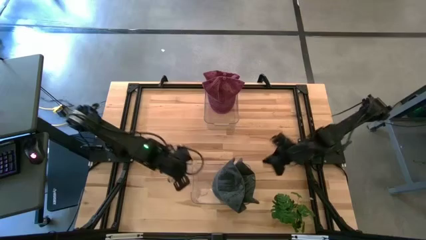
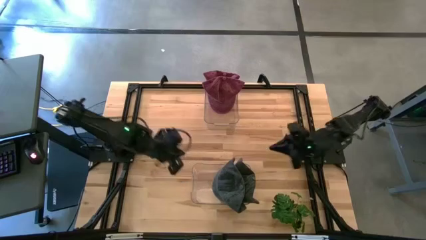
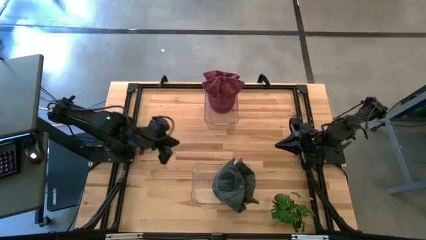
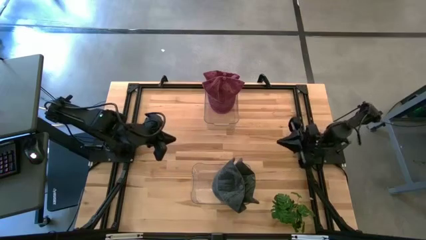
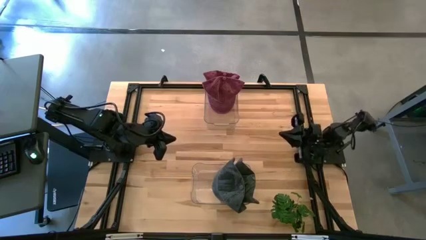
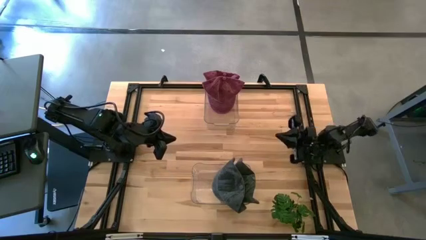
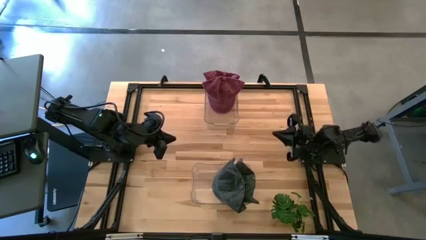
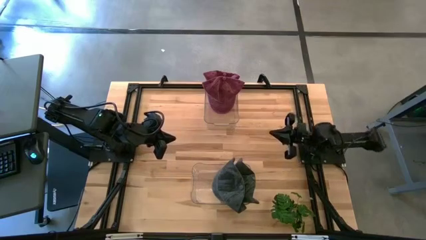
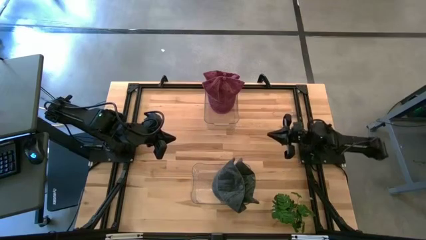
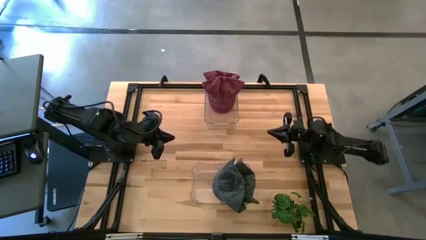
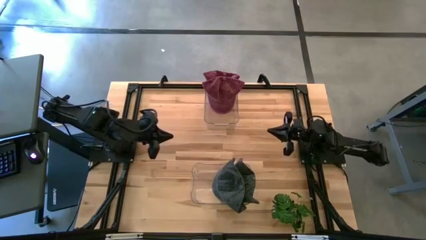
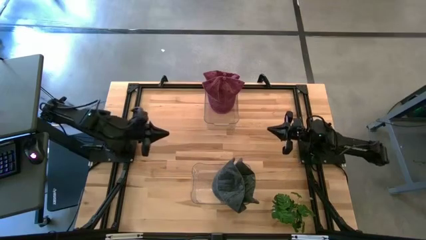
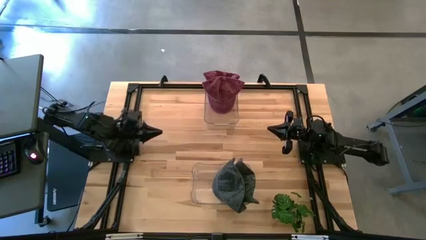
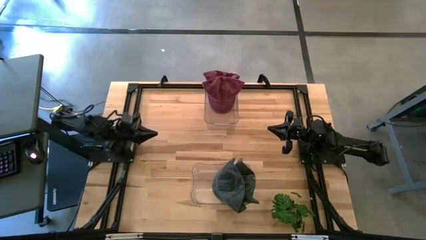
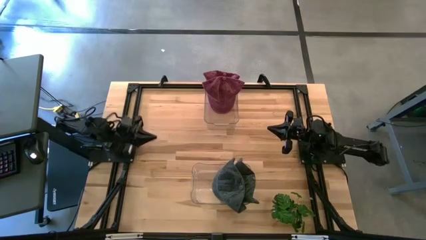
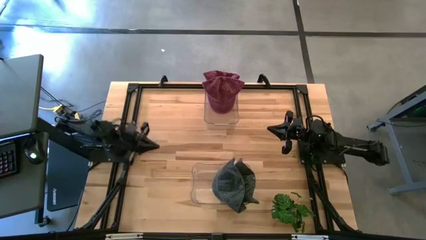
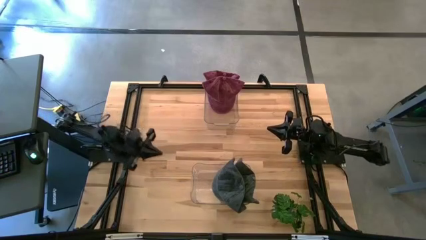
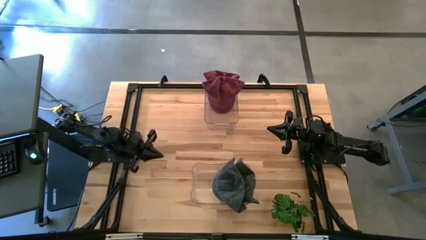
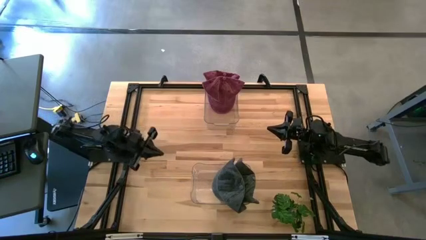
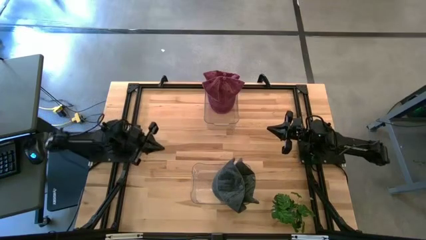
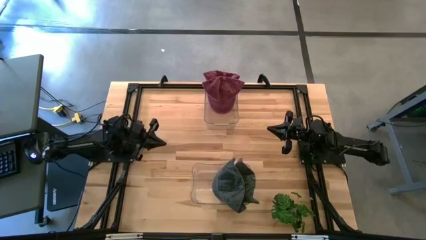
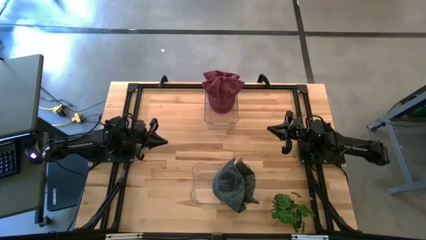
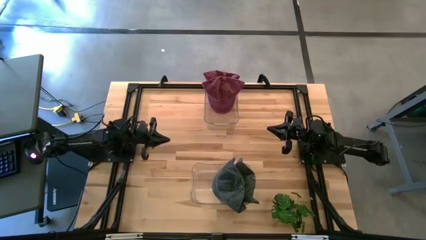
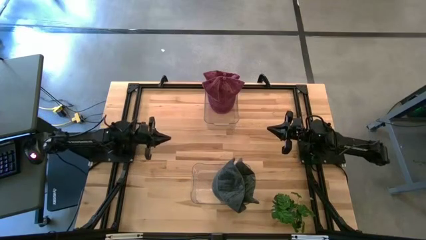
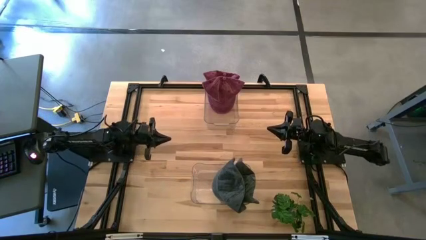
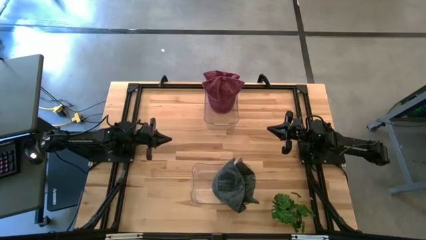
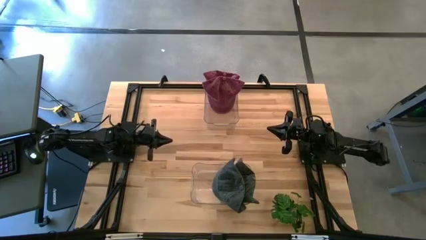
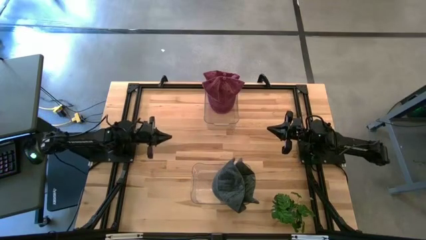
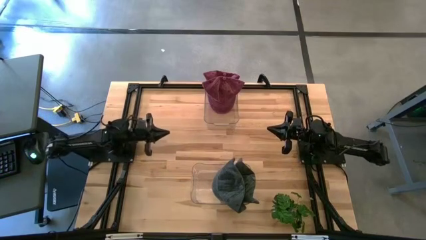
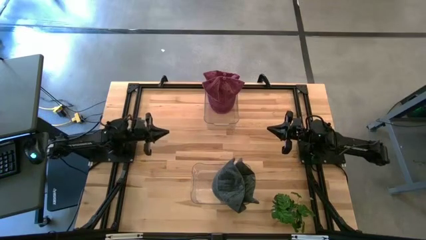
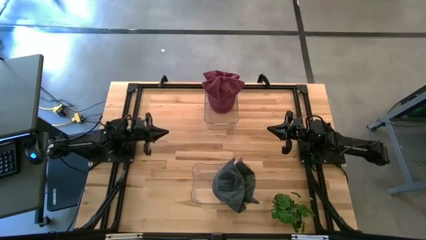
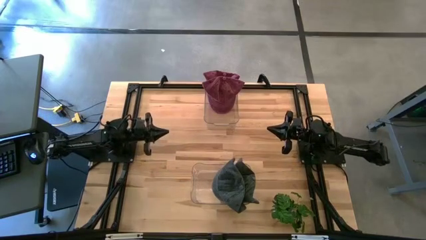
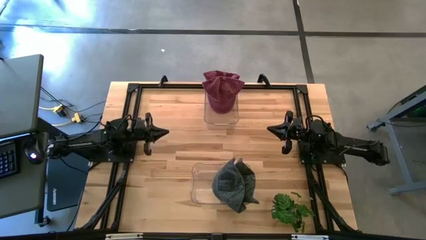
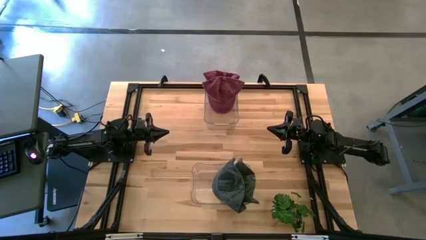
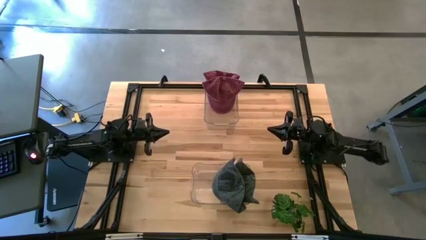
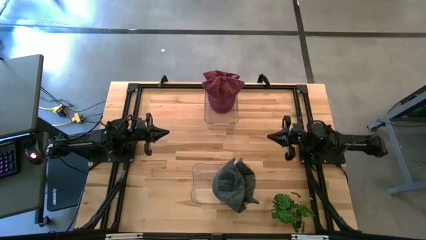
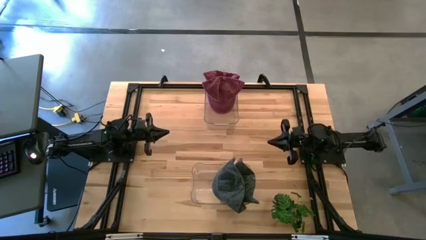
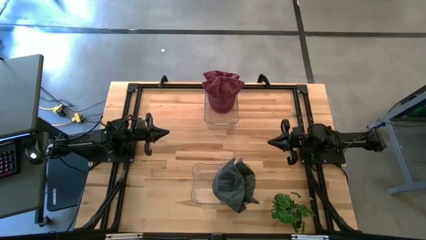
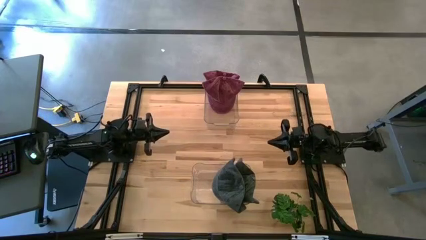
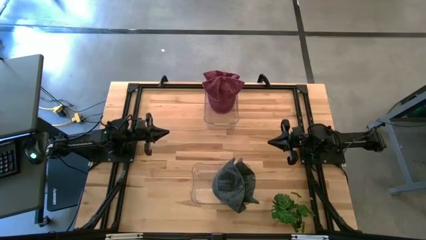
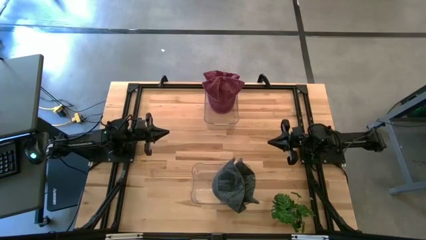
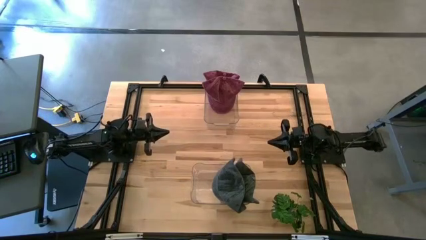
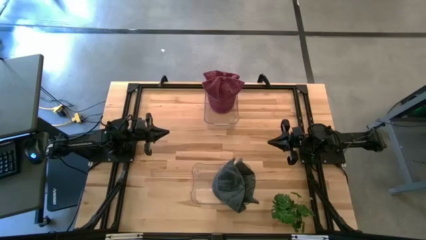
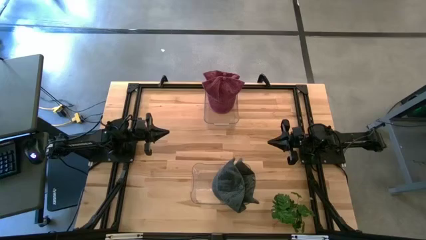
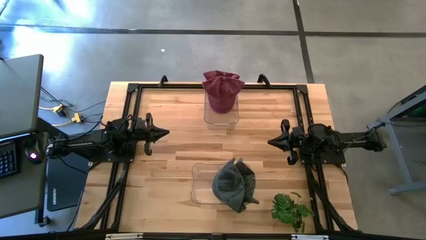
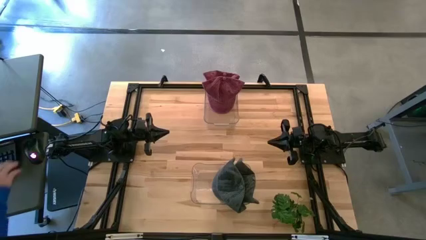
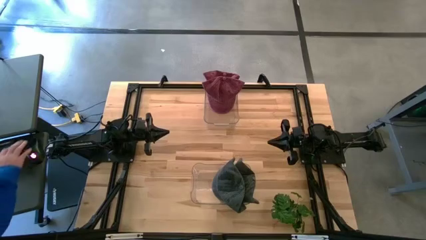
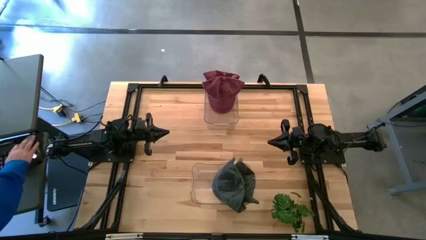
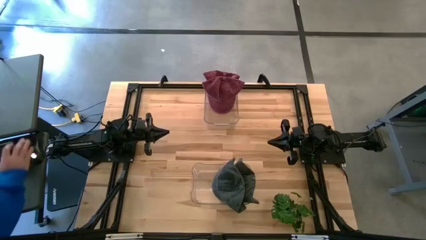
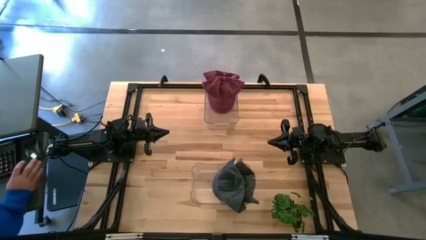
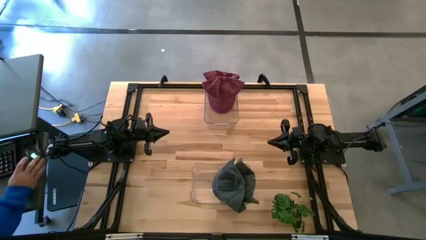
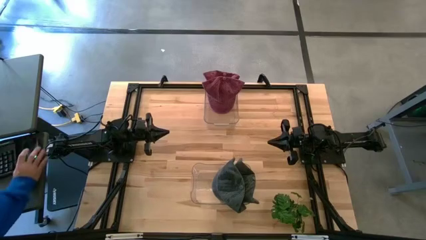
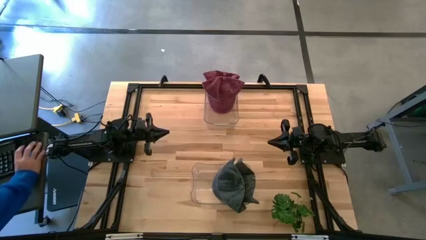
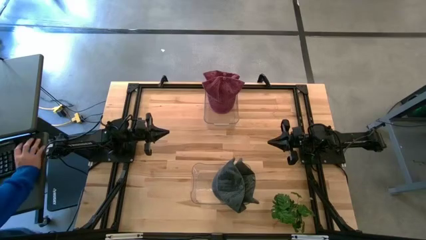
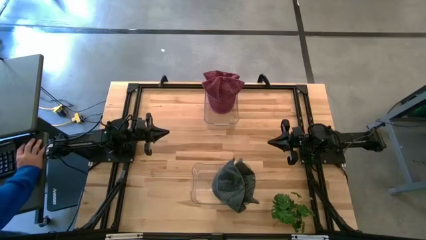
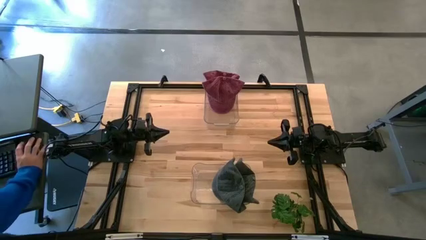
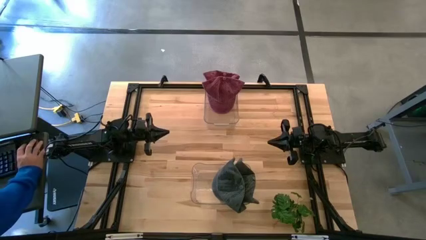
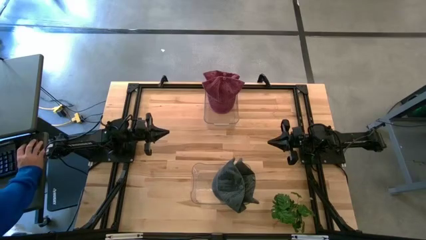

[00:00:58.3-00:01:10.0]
Task: Pick & Place hat
Return to home position
